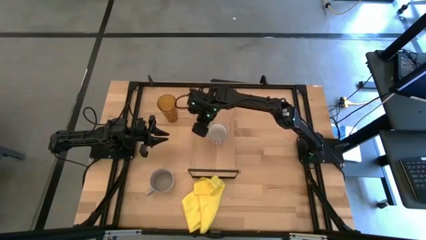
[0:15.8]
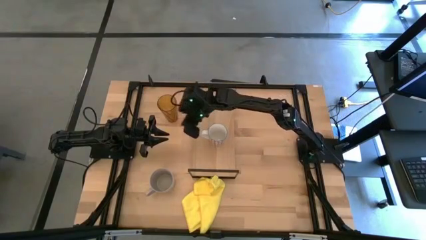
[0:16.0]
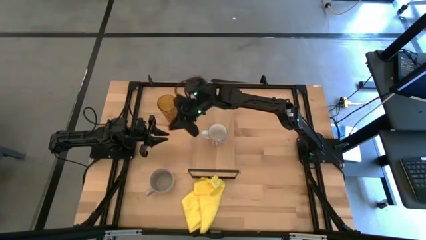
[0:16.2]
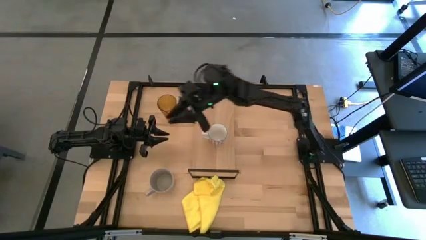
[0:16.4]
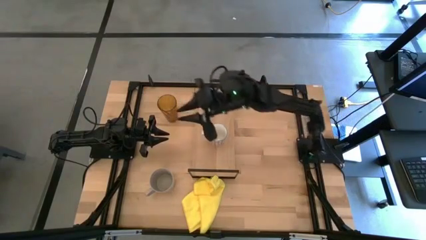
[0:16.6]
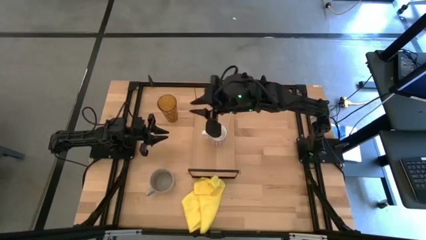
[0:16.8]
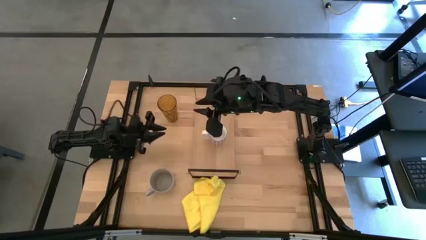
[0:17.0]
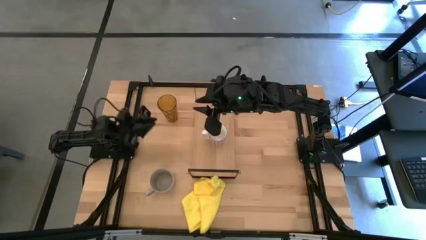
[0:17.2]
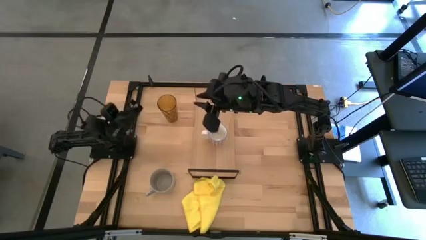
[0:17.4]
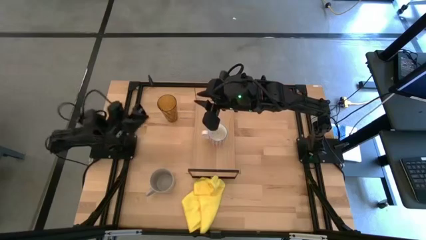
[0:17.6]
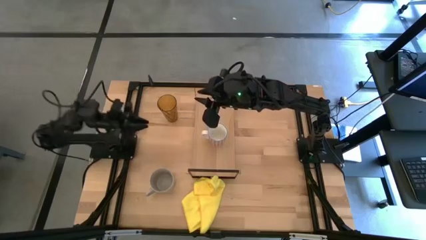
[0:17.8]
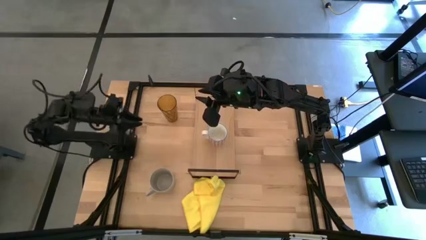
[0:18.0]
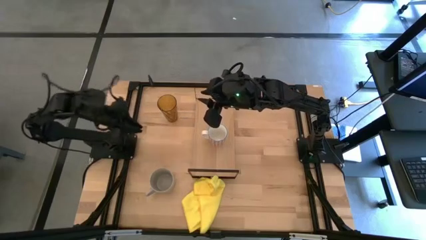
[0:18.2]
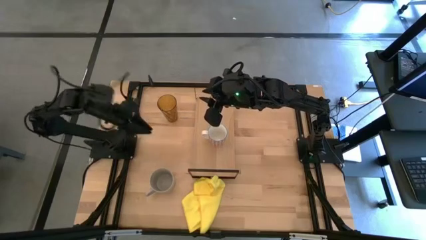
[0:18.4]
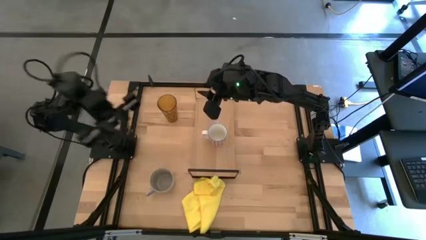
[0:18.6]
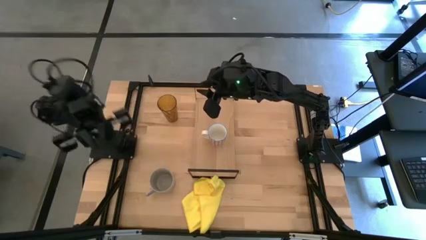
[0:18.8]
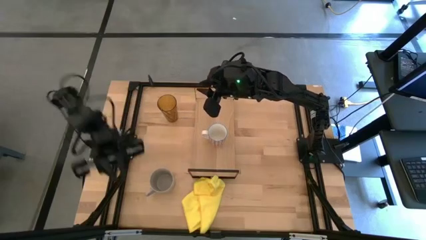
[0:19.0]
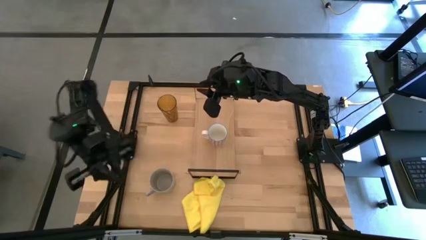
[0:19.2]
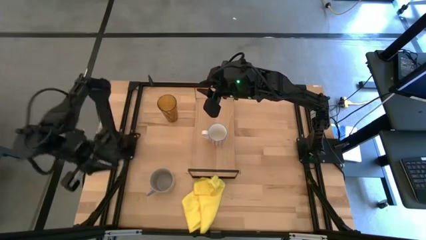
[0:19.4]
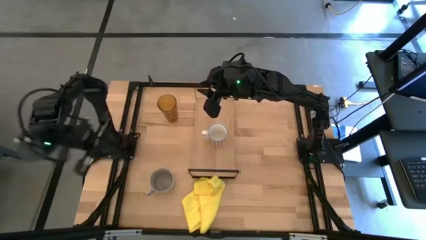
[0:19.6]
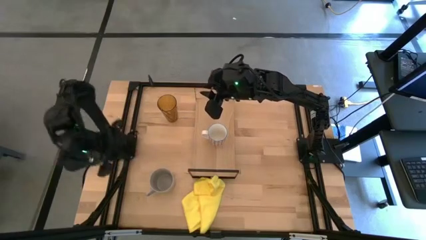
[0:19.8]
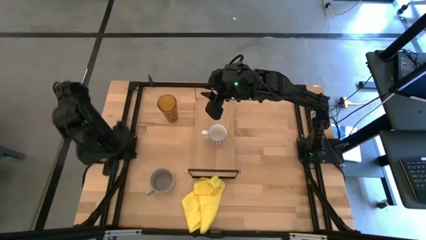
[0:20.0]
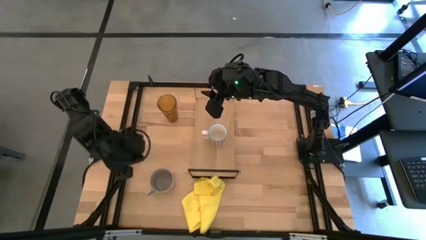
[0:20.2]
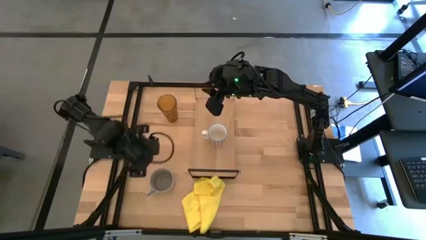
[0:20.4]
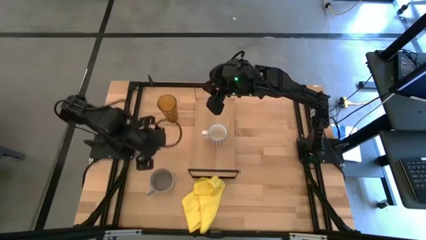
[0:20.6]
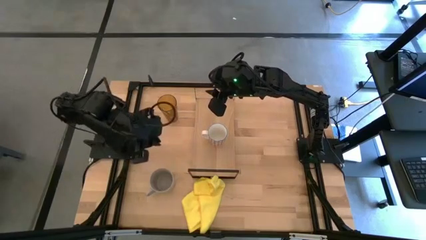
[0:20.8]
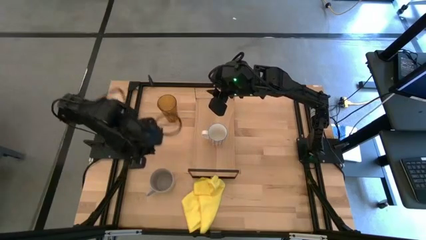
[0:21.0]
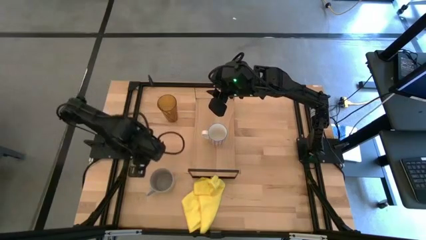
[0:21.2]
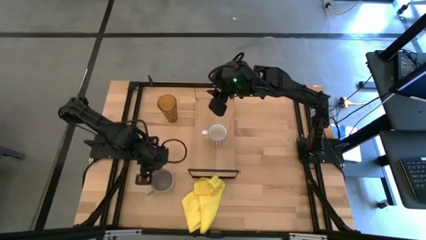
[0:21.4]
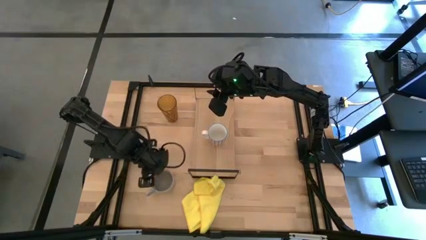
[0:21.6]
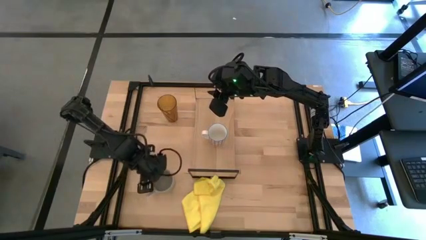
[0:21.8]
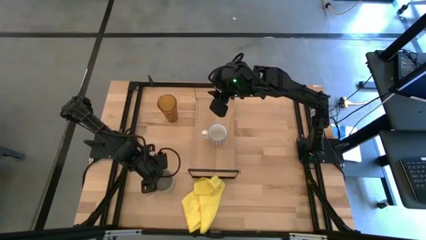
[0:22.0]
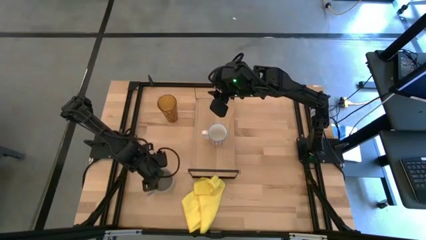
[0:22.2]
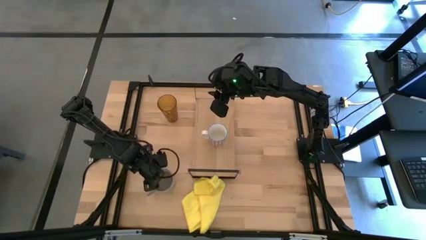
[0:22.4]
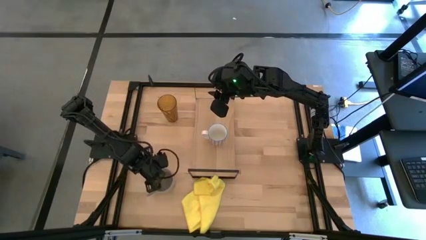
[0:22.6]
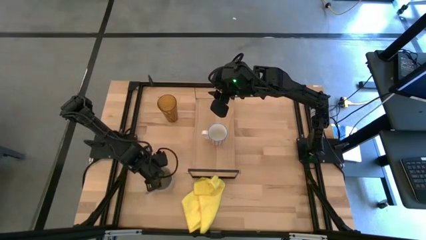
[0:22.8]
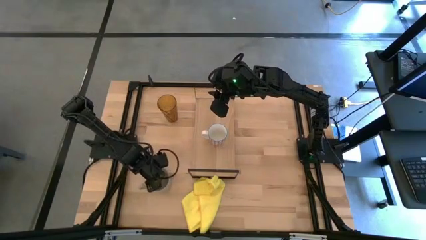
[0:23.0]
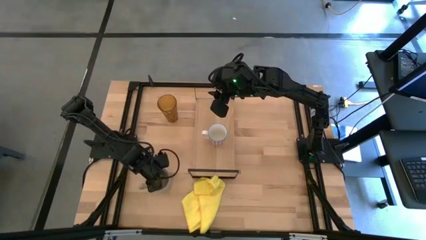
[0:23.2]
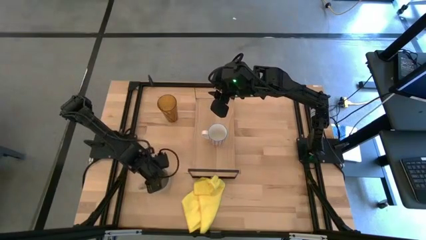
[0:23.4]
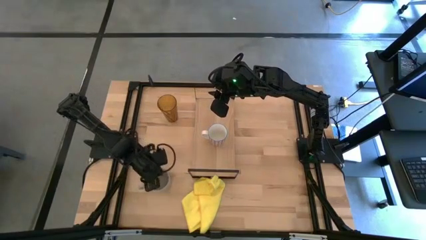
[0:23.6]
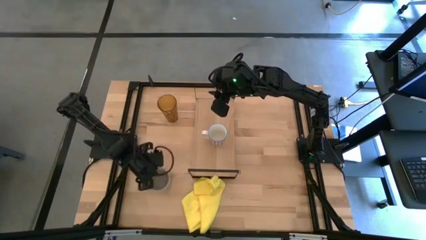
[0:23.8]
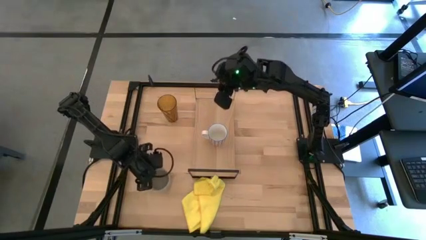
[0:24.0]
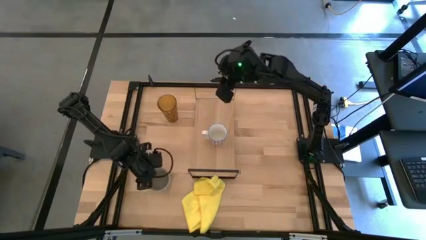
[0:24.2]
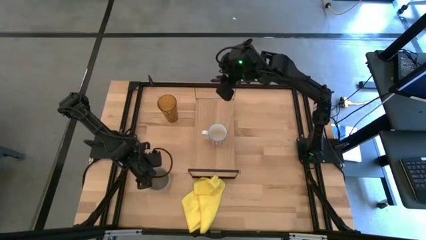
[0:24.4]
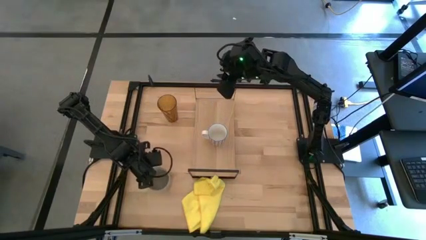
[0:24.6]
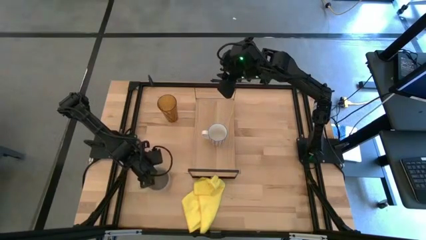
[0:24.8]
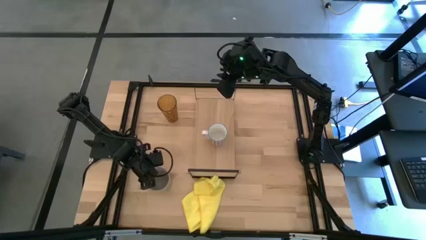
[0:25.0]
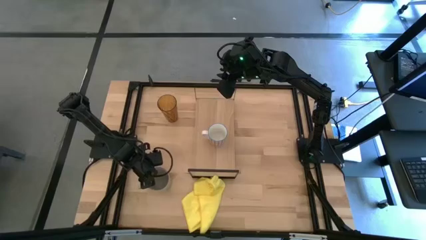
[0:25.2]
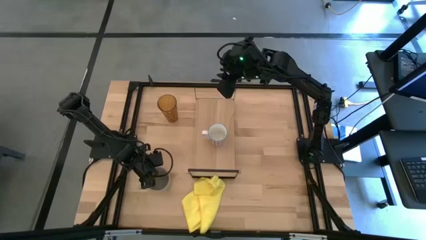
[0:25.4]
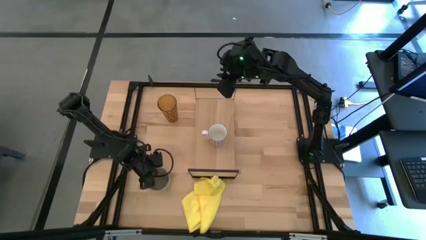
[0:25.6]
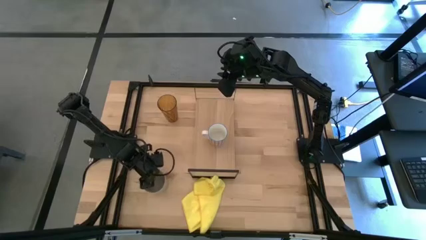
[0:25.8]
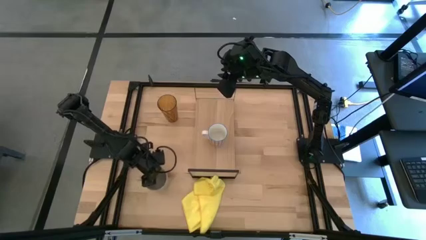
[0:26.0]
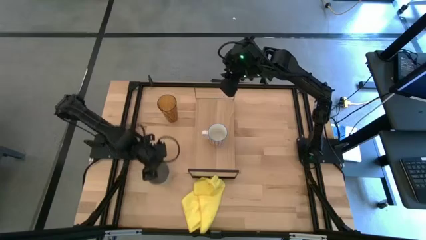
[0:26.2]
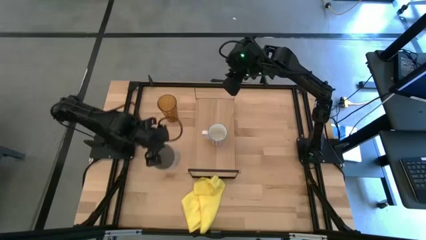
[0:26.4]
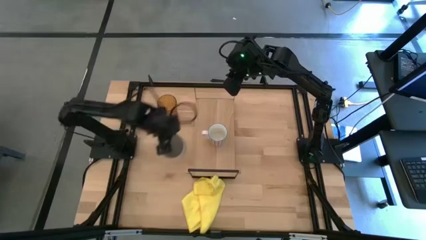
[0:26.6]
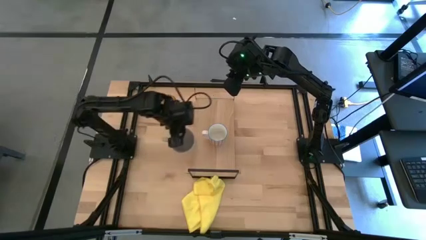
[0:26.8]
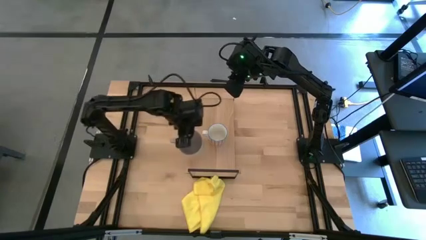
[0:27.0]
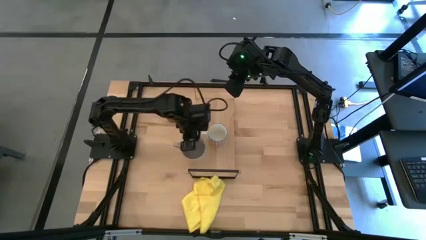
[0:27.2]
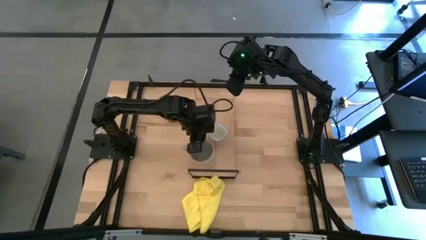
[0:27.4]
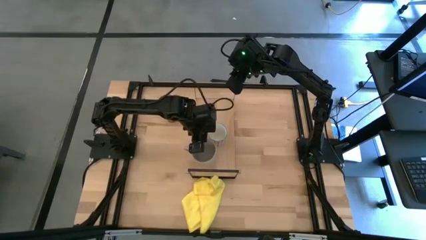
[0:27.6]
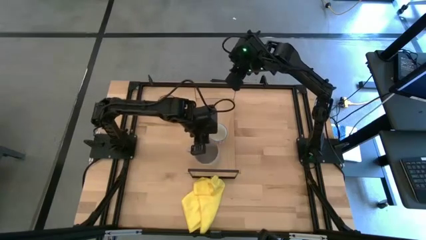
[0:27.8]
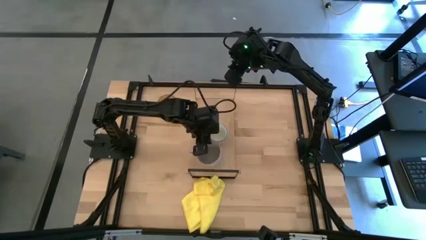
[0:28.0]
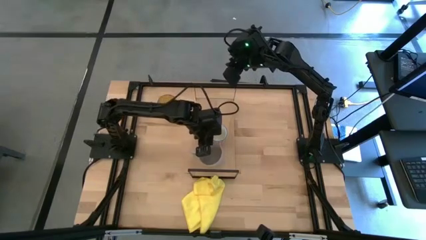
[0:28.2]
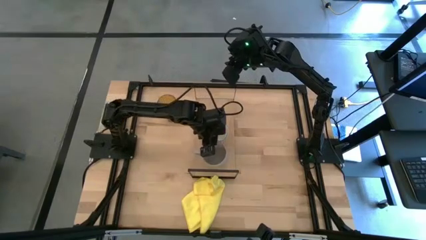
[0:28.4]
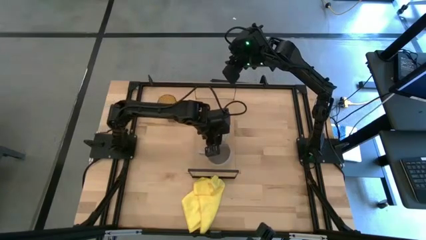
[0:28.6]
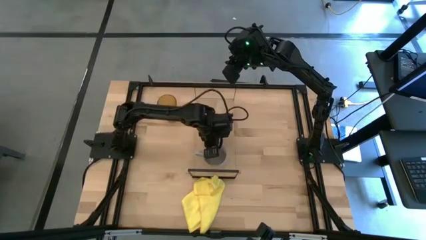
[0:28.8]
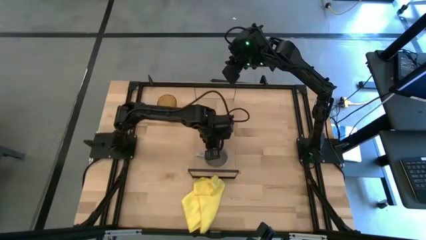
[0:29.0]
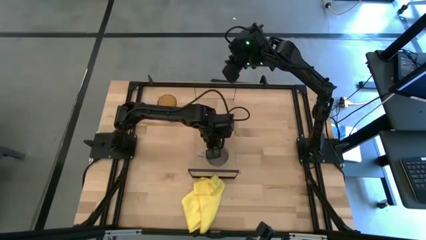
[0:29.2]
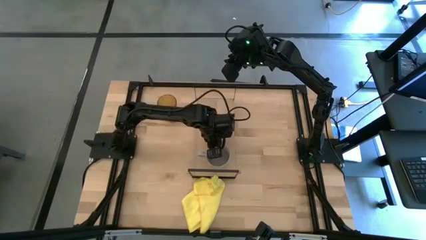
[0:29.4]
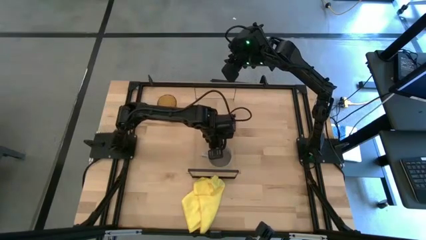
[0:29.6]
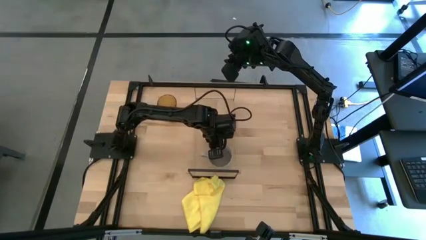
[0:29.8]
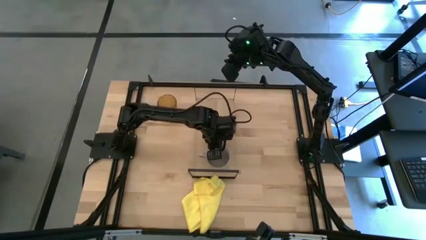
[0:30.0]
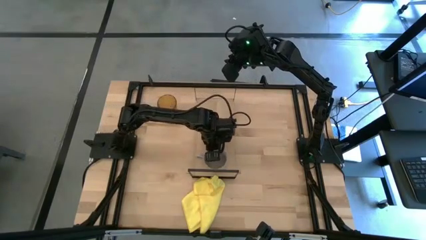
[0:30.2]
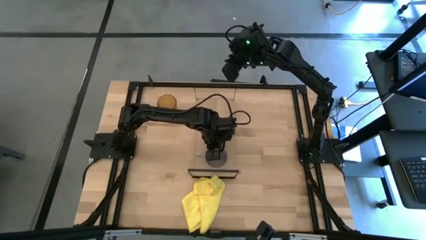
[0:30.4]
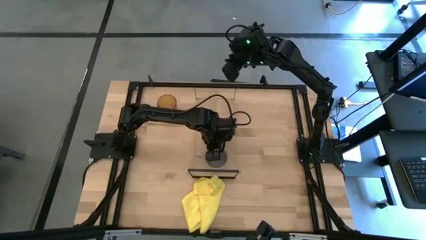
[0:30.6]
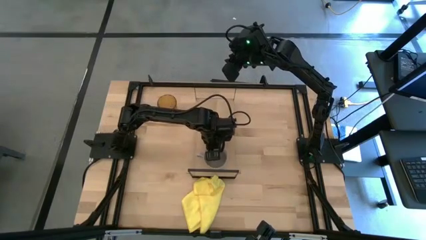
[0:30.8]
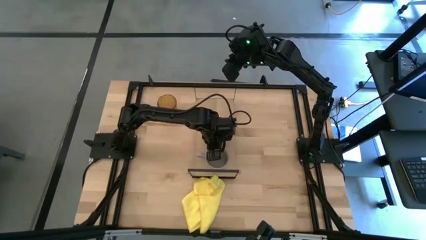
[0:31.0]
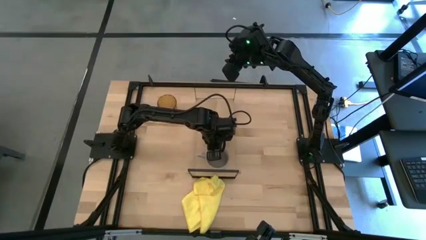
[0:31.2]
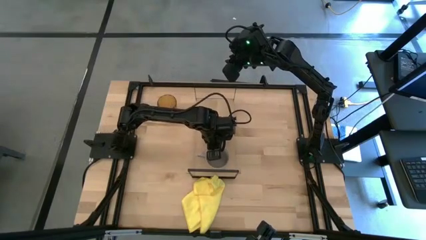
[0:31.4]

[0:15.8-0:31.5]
Task: Stack small to large cups/mugs on shelf
Put the gray mug on the shelf
